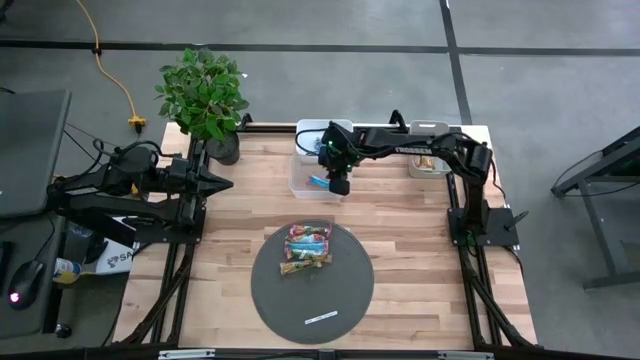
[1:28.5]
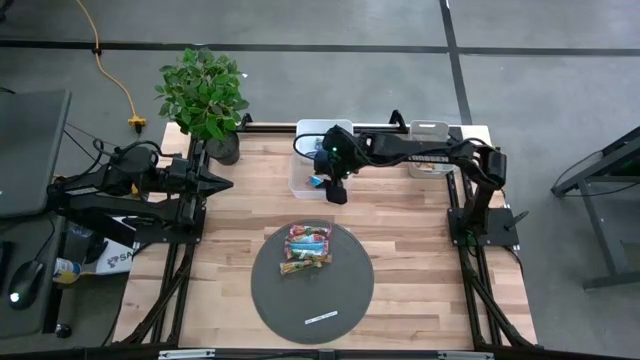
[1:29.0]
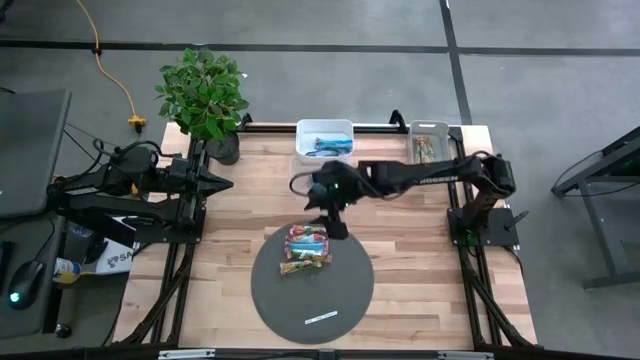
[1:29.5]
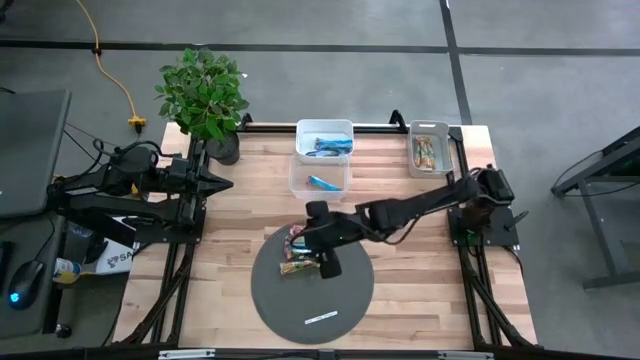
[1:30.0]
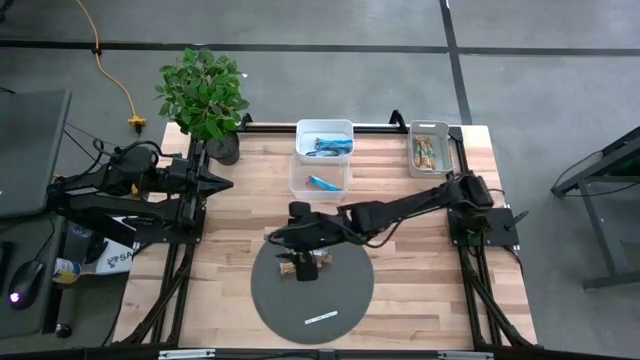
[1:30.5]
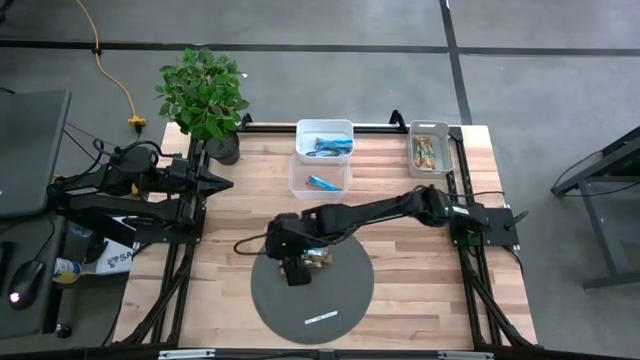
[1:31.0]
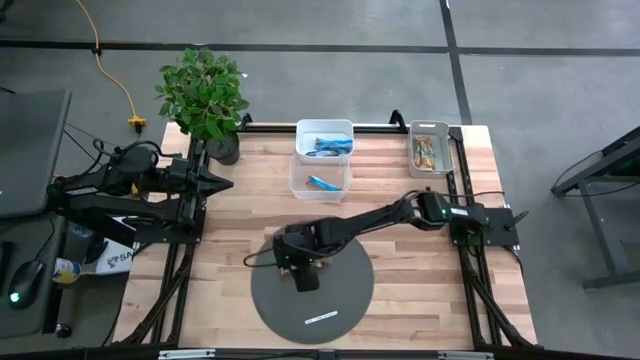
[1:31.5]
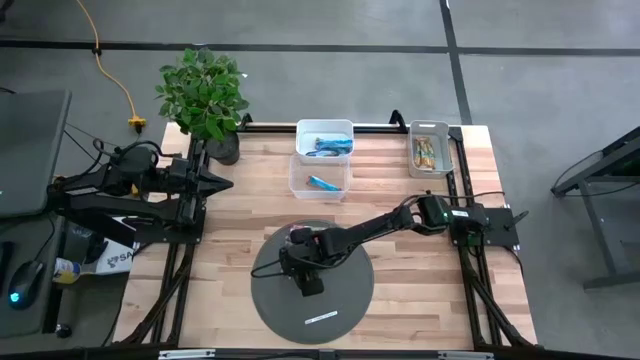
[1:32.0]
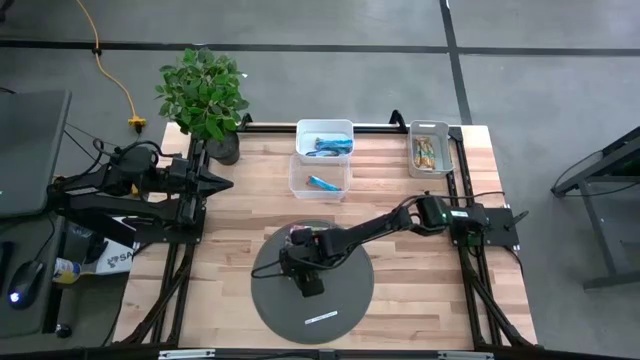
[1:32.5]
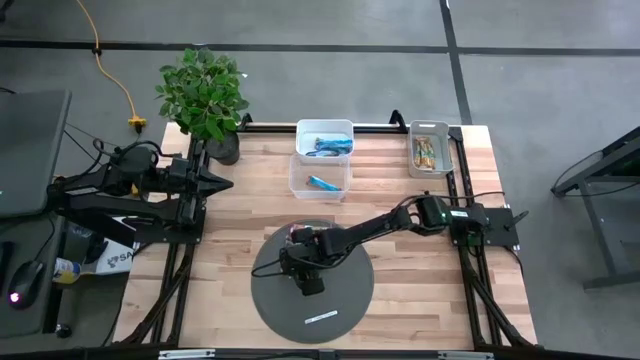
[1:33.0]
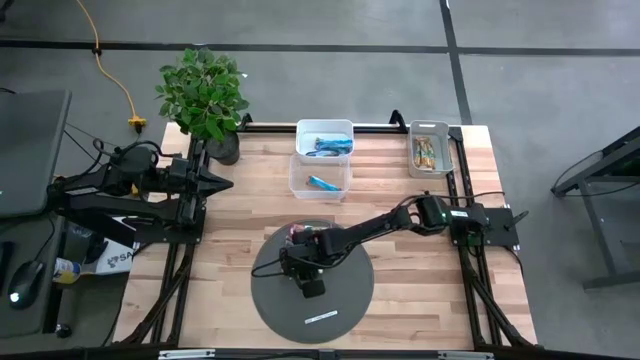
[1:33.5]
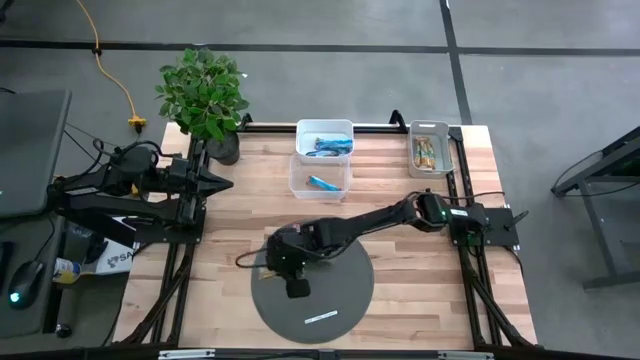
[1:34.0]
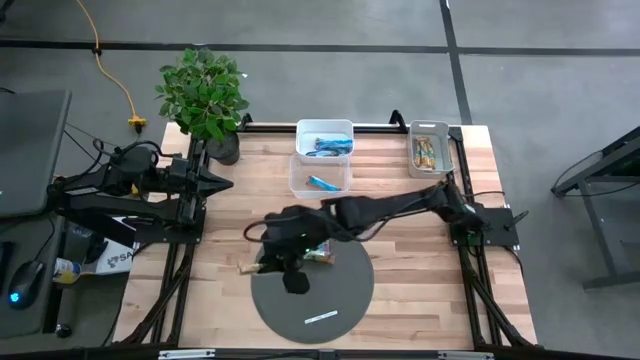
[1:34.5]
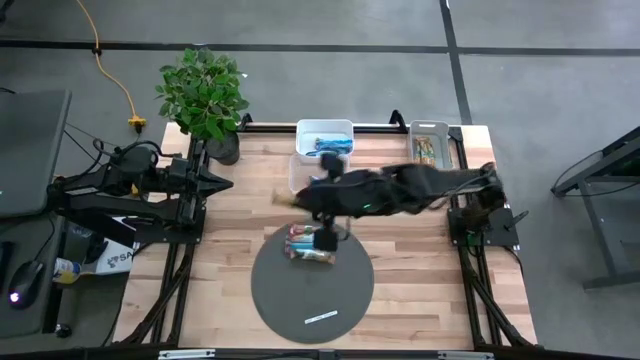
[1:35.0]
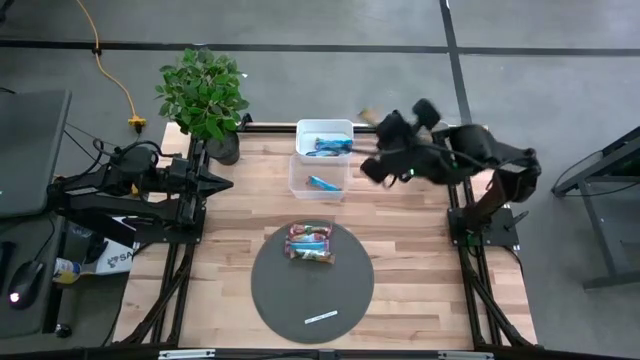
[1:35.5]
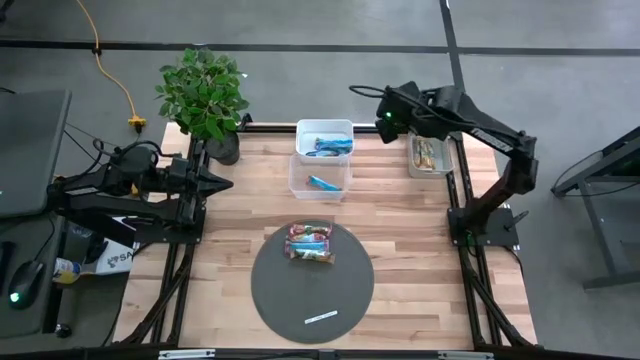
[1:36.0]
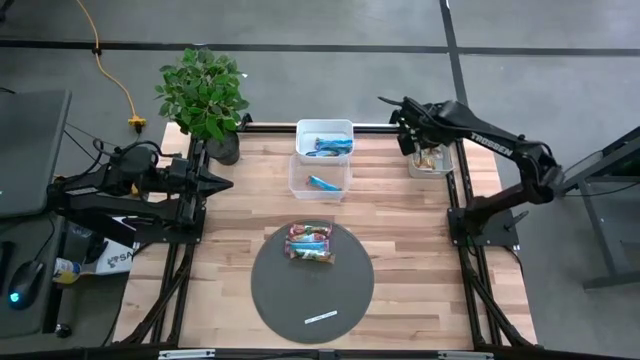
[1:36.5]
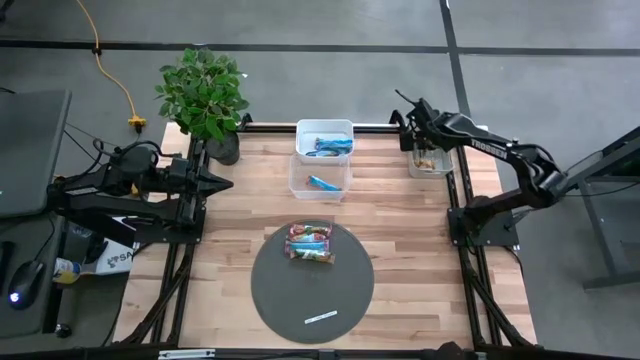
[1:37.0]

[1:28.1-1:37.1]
Task: Pick and place Granola Bars by type
Put the yellow granola bar into the gray bin

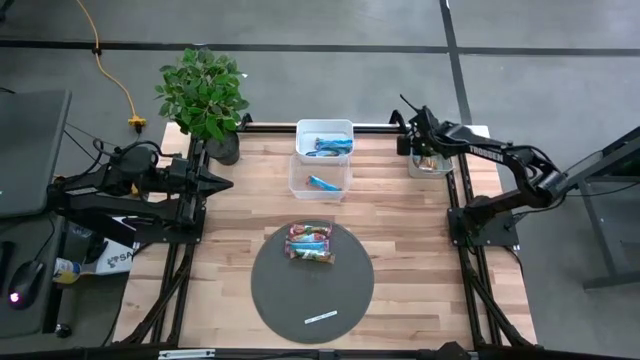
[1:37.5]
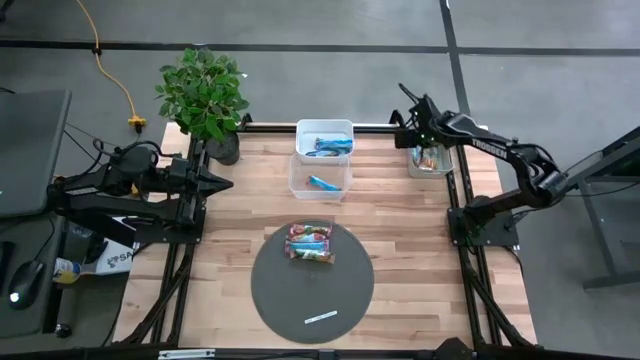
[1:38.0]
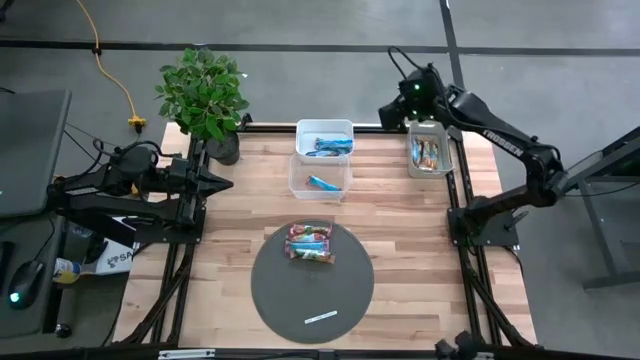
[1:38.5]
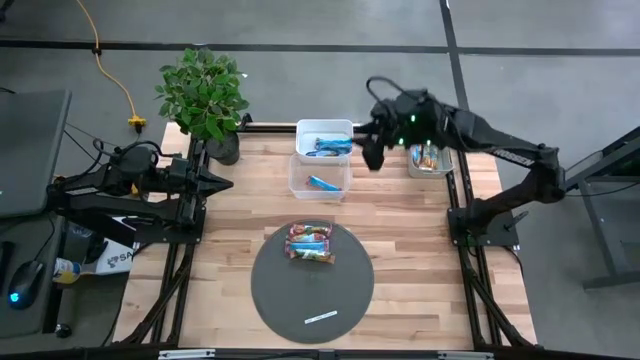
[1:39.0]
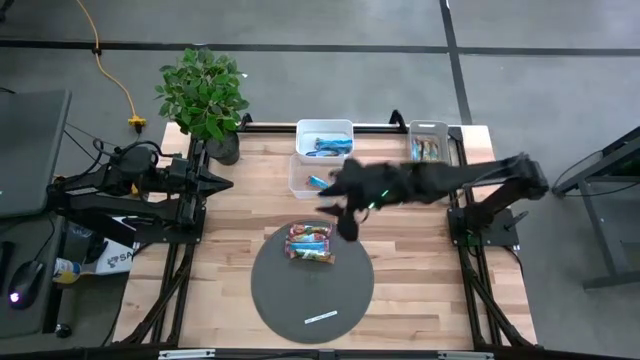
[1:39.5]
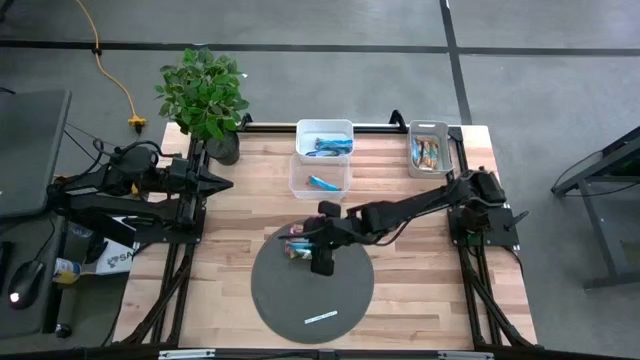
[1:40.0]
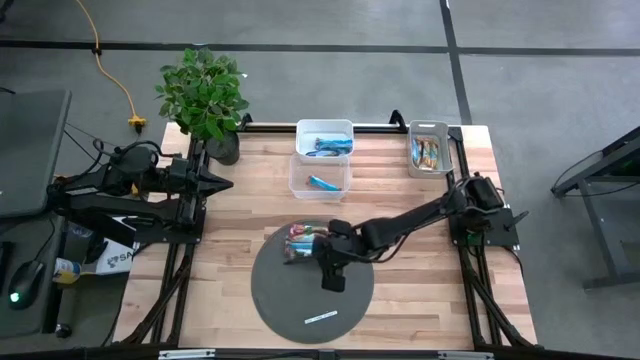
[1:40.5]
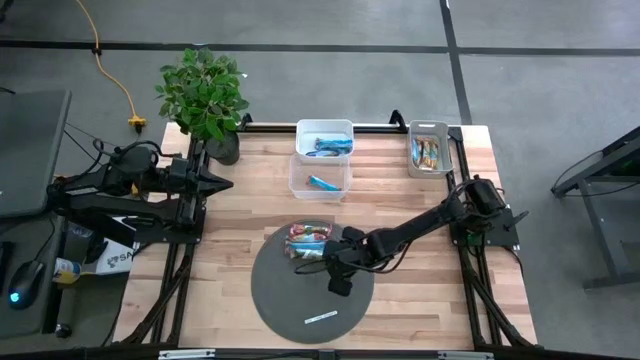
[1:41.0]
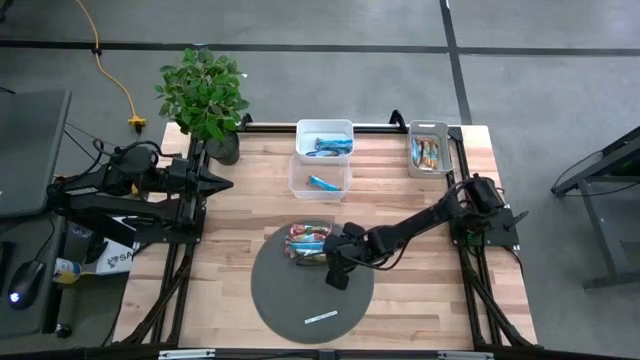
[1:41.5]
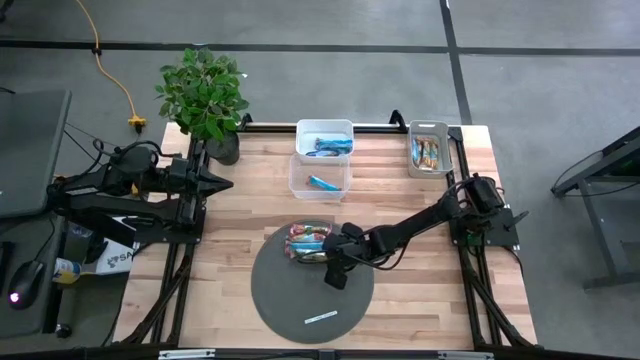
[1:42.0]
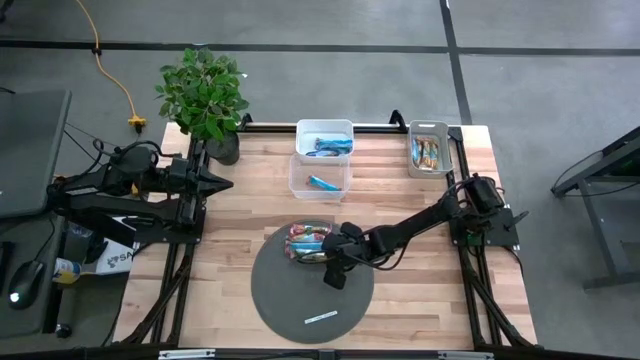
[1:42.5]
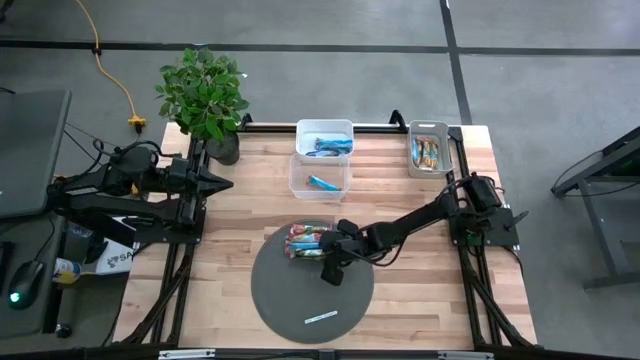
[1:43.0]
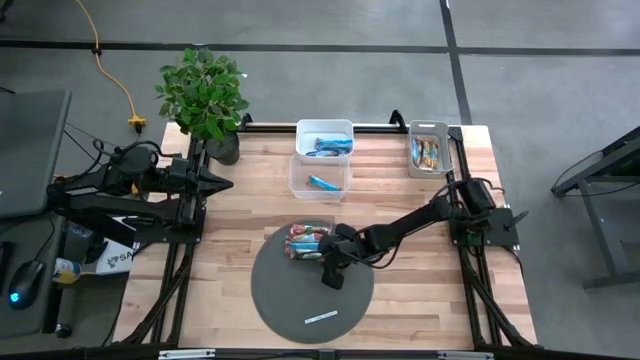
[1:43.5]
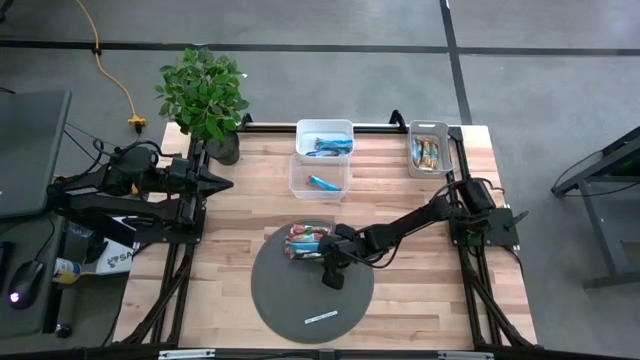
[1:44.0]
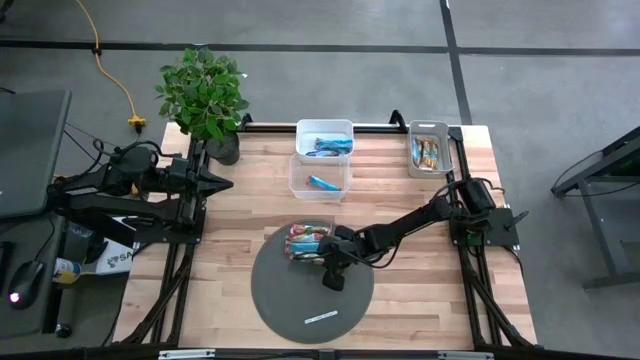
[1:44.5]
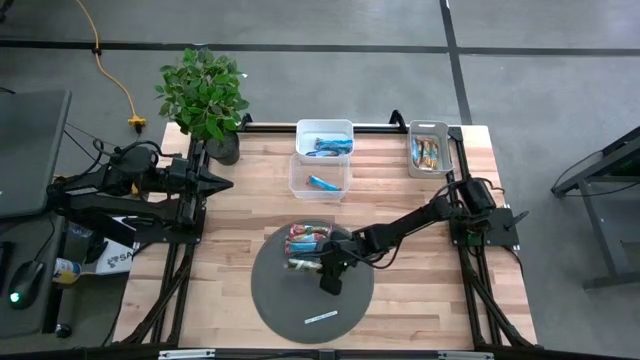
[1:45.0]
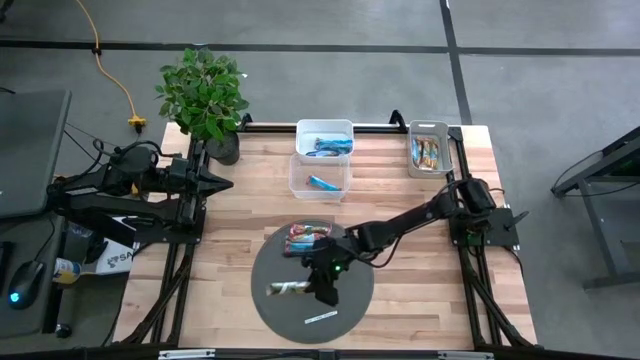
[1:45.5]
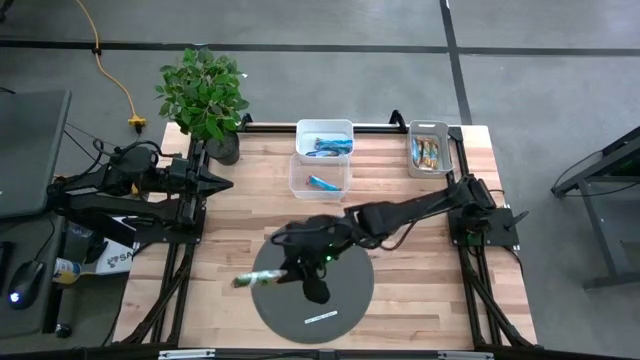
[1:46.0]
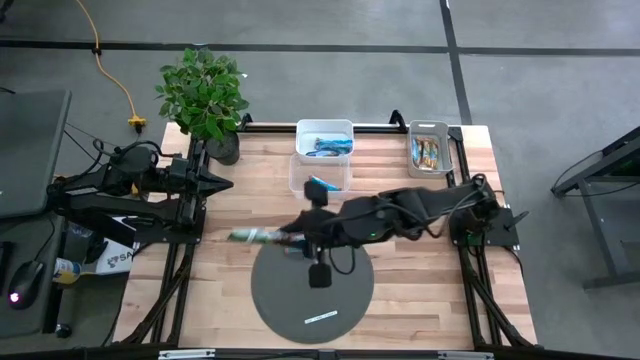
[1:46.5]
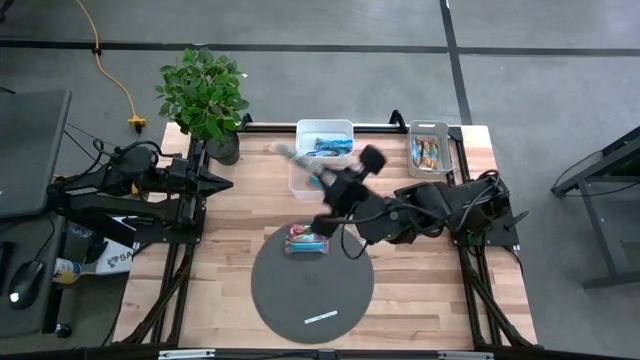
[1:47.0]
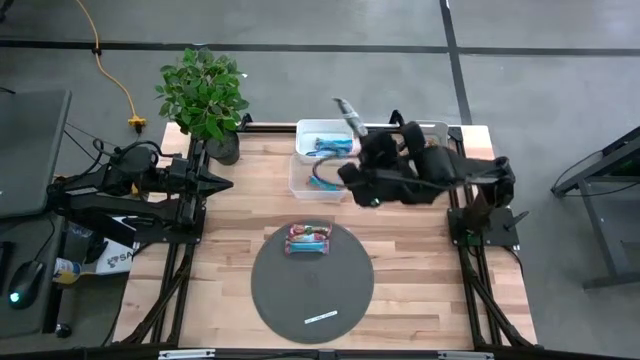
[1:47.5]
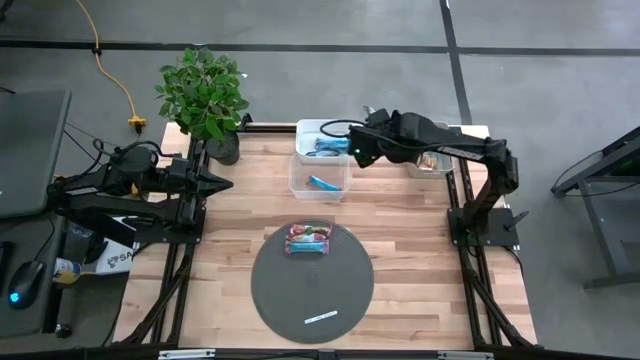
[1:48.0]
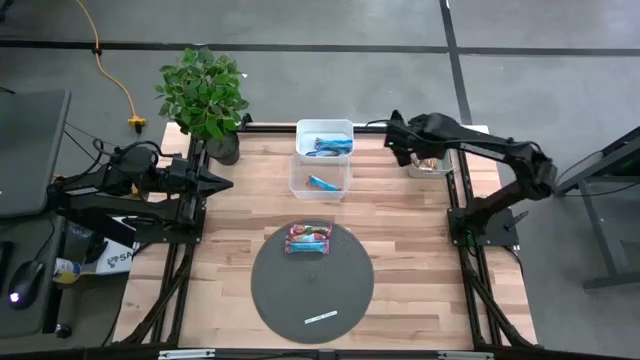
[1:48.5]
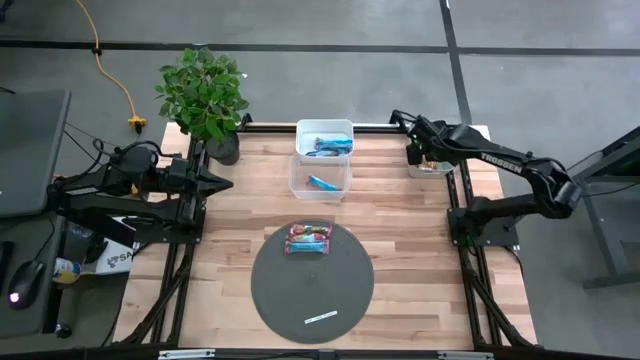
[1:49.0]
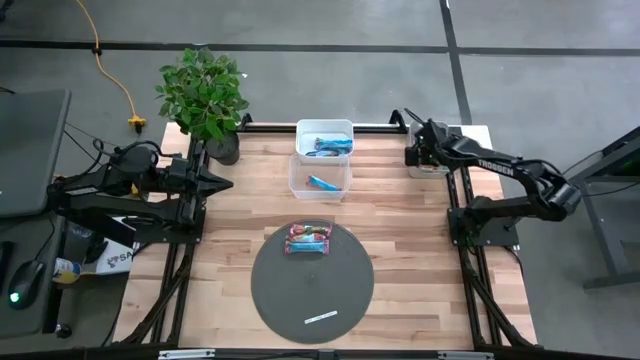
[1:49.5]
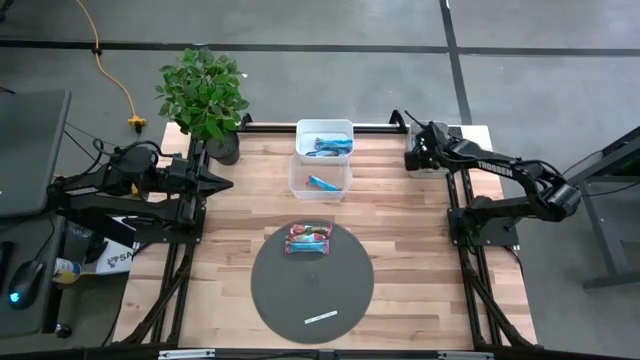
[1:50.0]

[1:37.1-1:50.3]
Put the yellow granola bar into the gray bin
